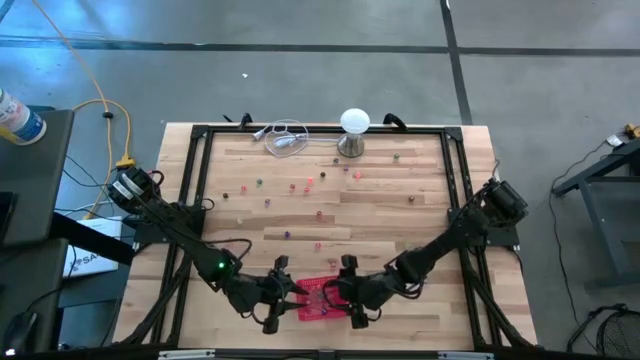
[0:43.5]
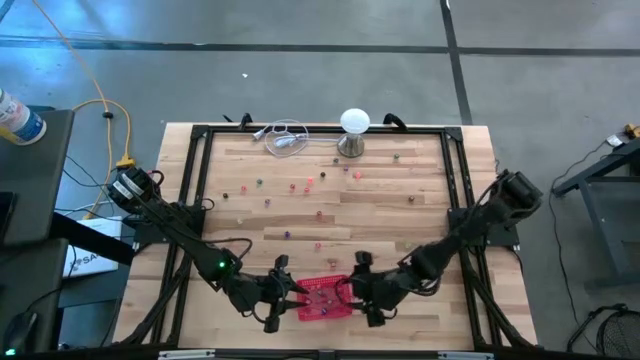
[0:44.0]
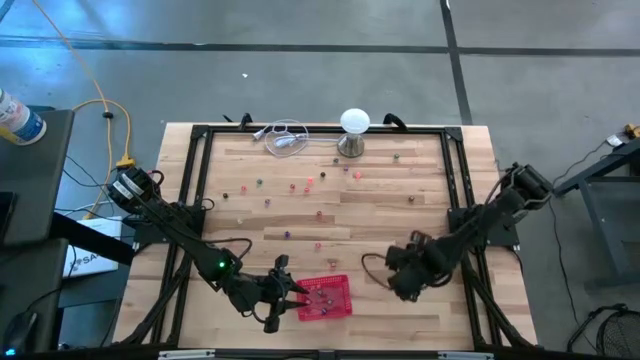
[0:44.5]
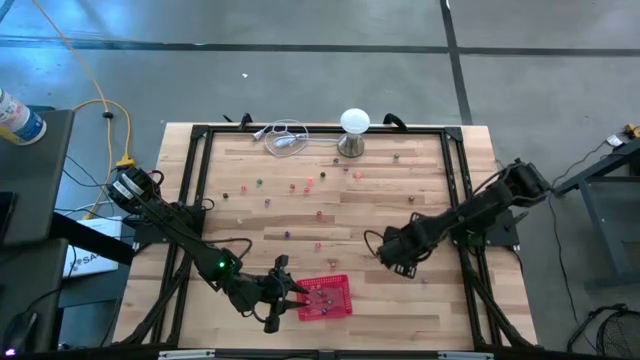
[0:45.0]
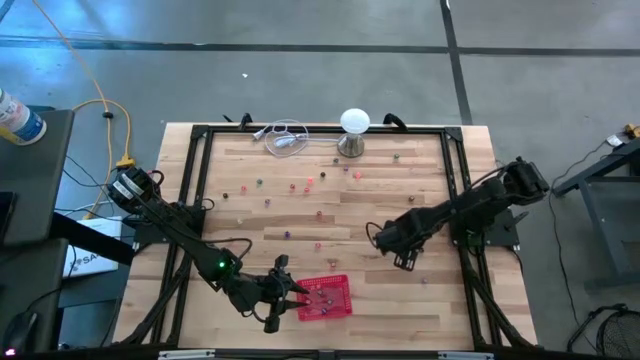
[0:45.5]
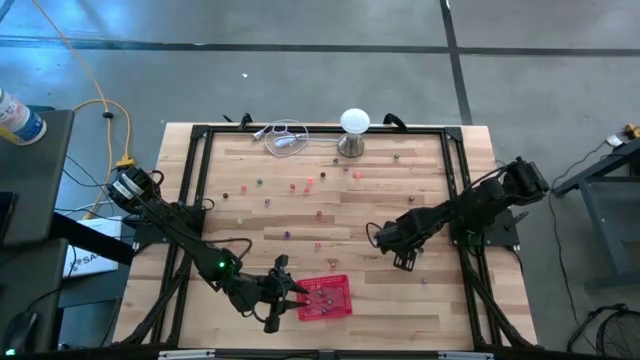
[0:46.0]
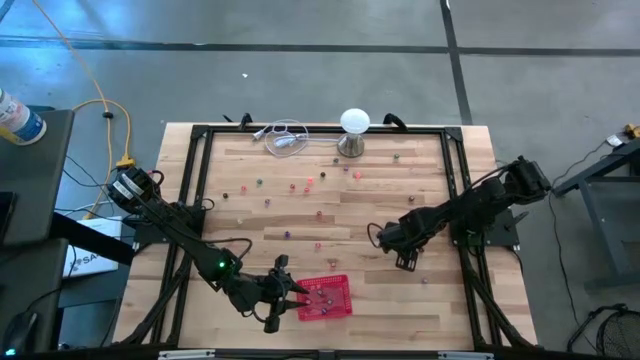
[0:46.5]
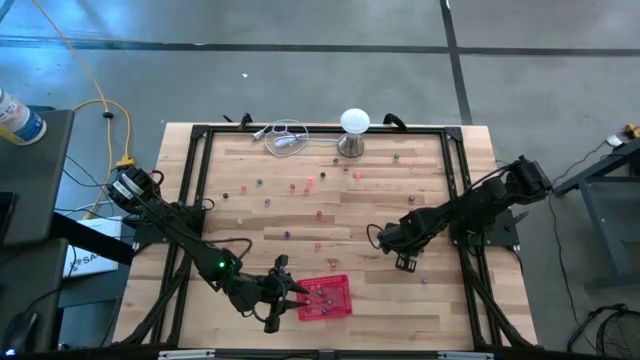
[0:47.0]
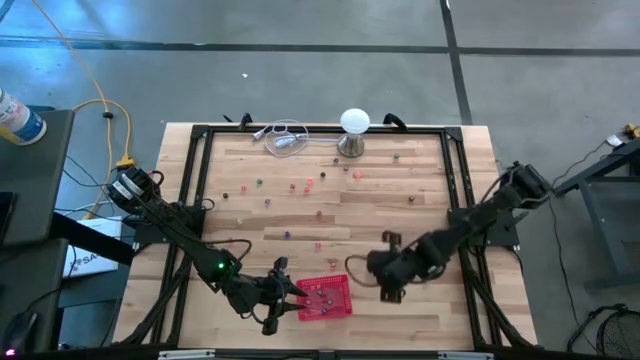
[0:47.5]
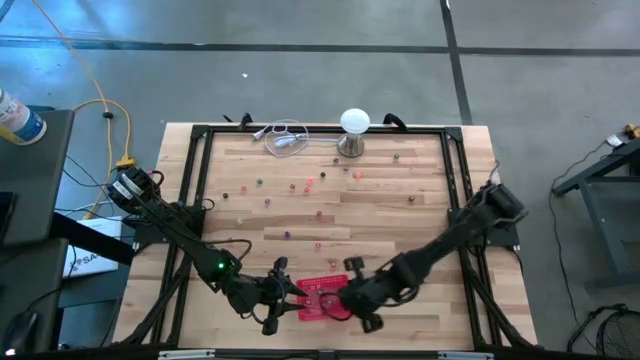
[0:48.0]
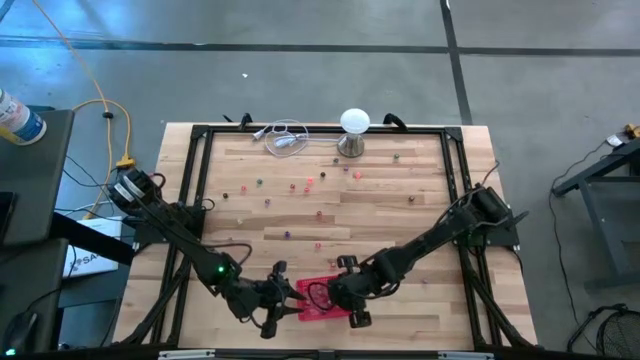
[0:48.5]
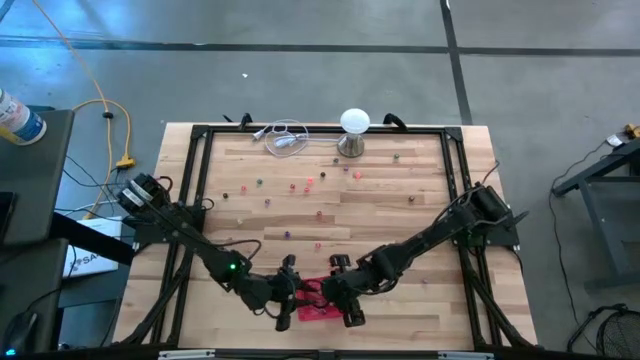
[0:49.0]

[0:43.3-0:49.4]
Task: Pick & Place Dice
Put the yellow dice into the red bin

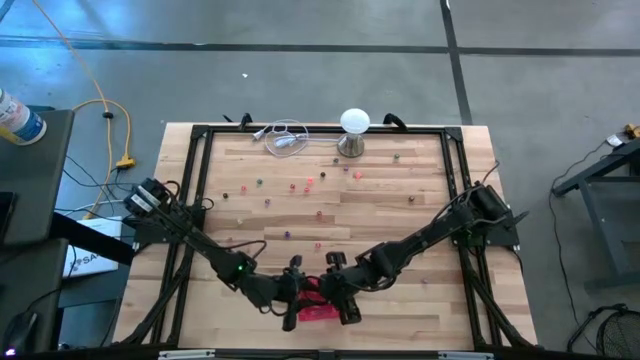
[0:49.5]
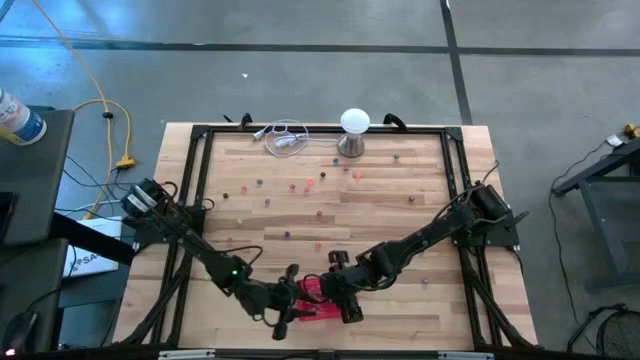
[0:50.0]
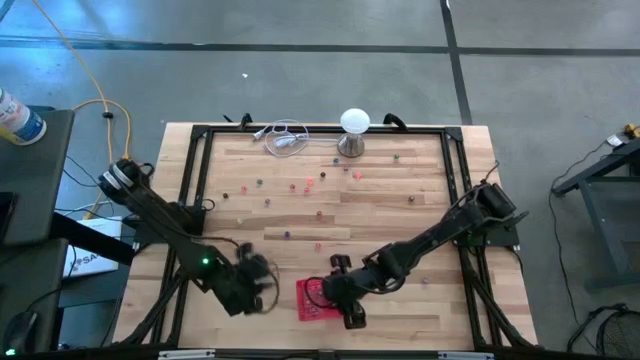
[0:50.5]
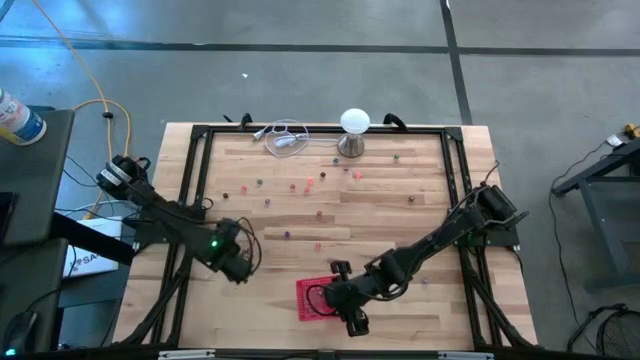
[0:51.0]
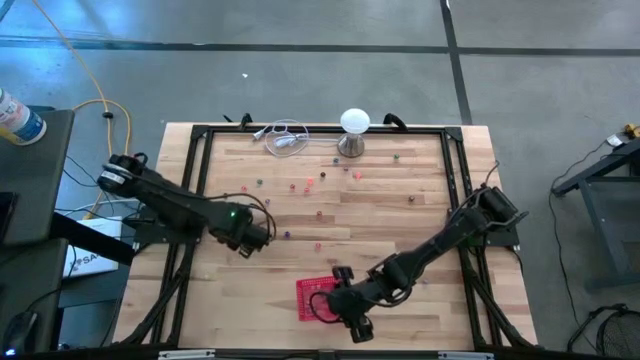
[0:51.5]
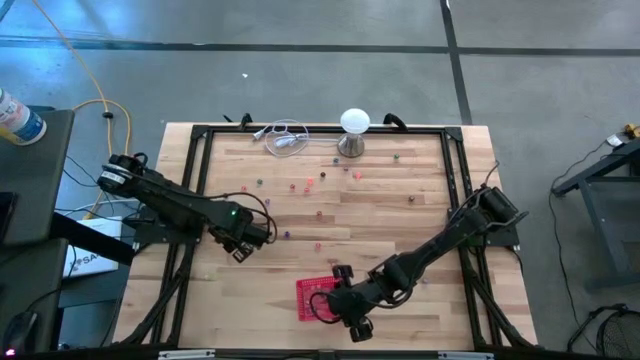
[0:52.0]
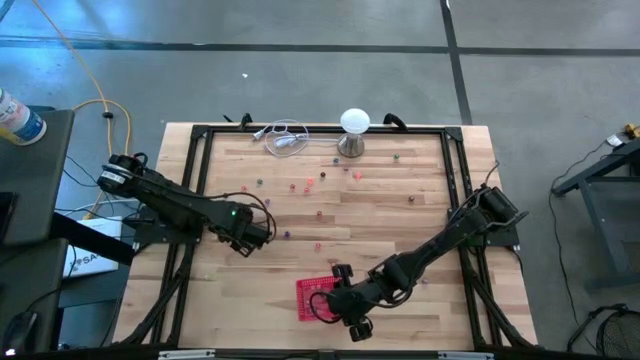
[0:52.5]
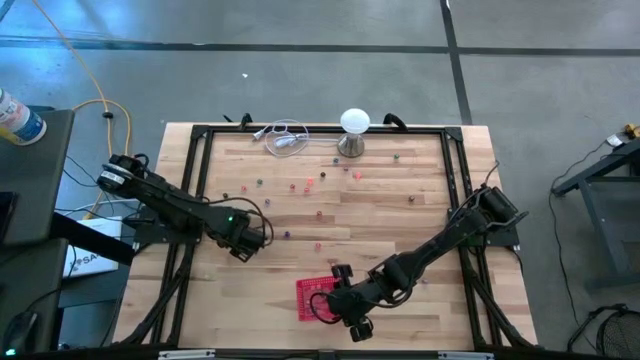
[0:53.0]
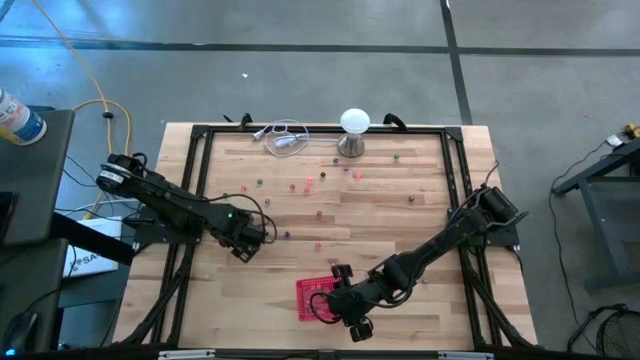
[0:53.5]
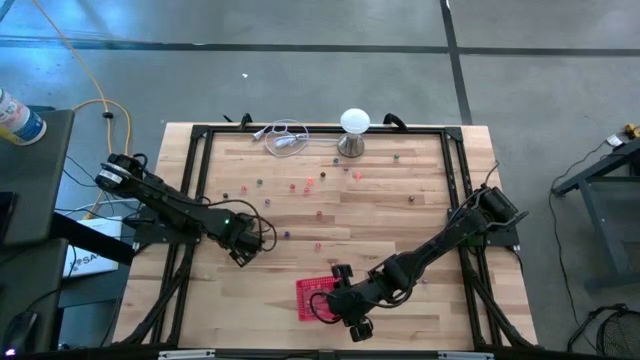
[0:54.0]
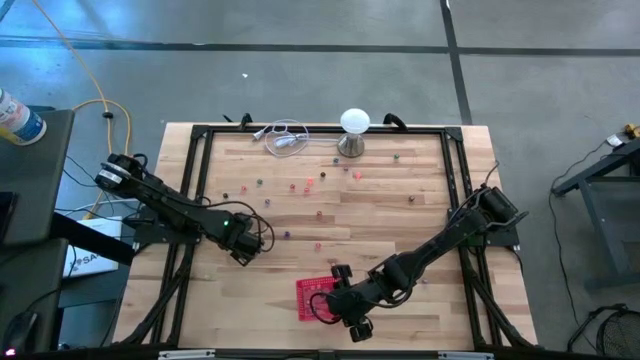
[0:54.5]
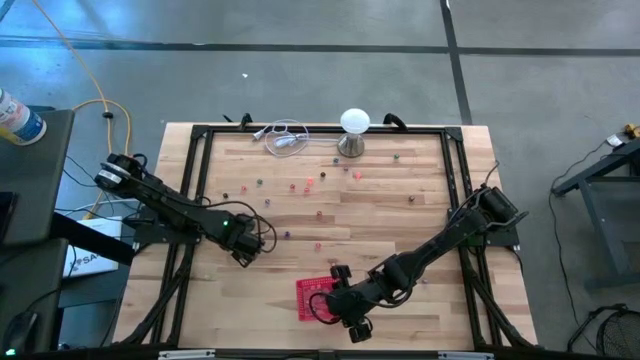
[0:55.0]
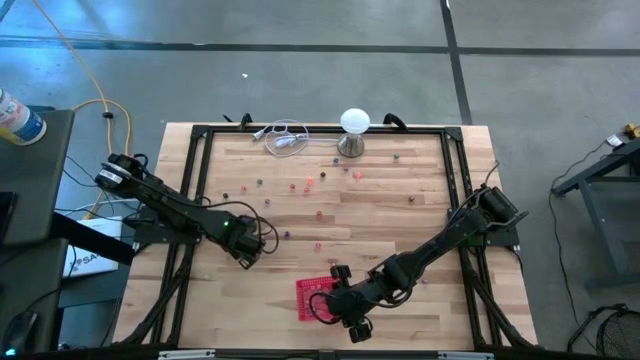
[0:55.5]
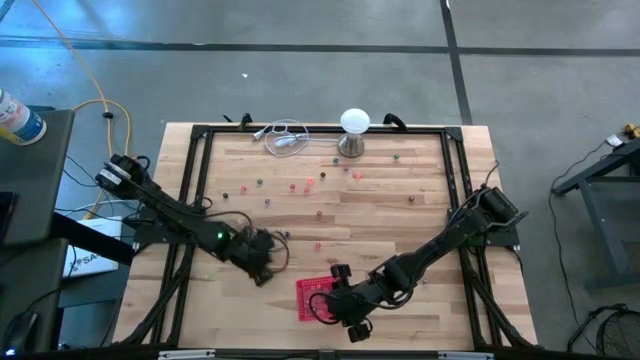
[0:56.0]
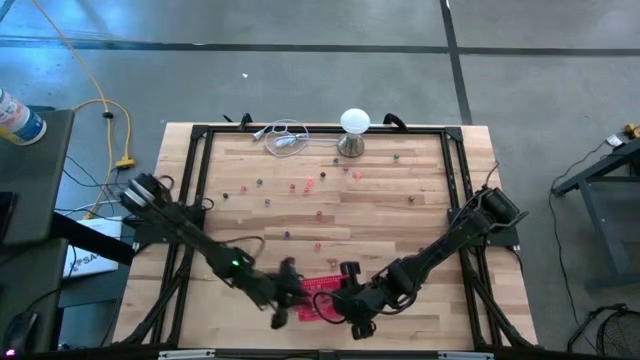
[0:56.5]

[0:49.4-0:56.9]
Put the red dice into the red bin

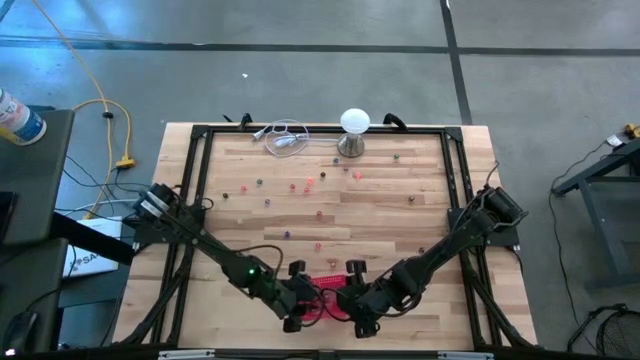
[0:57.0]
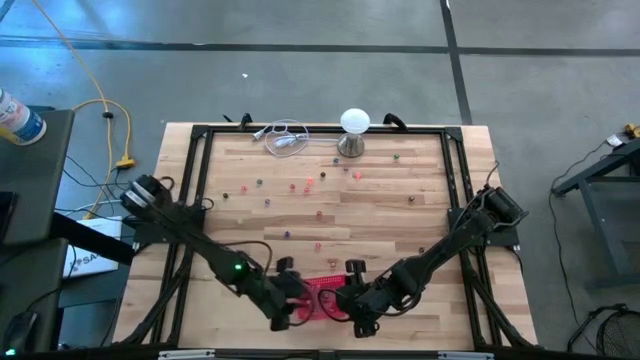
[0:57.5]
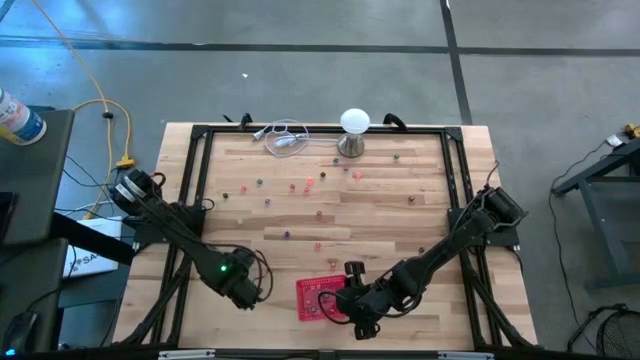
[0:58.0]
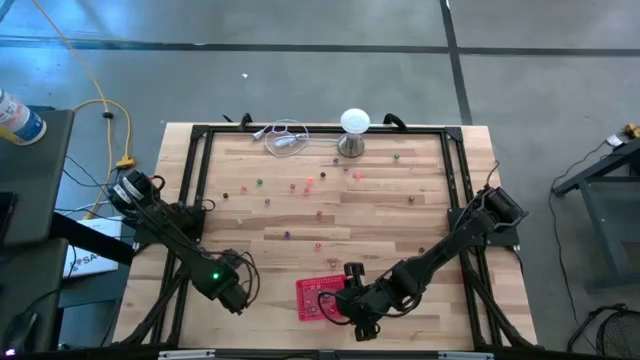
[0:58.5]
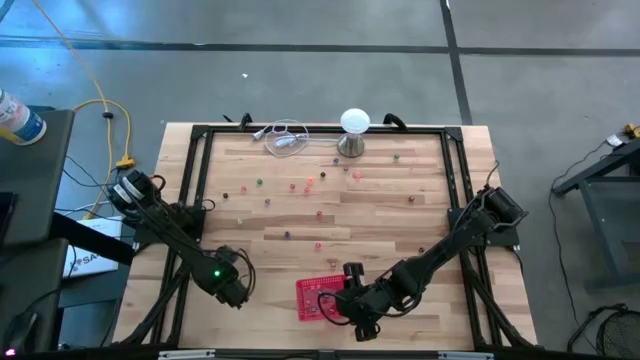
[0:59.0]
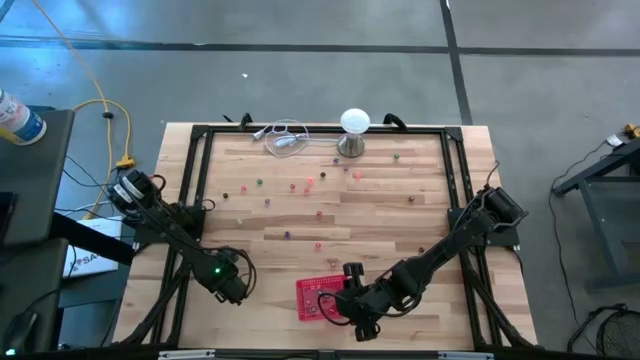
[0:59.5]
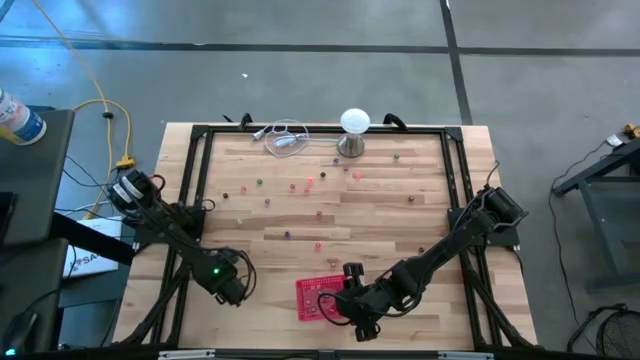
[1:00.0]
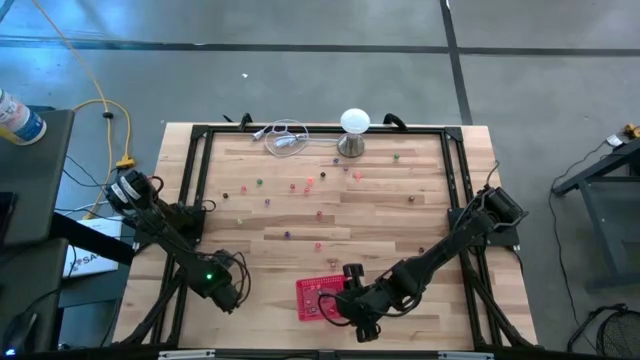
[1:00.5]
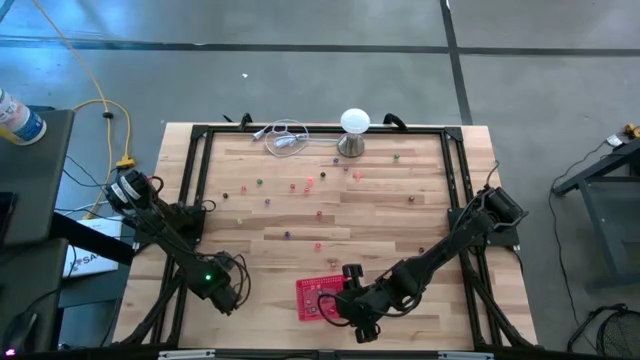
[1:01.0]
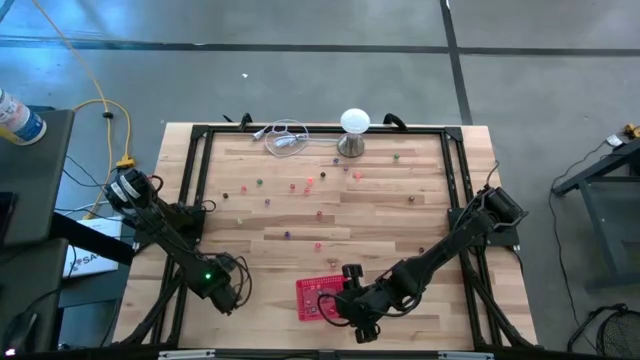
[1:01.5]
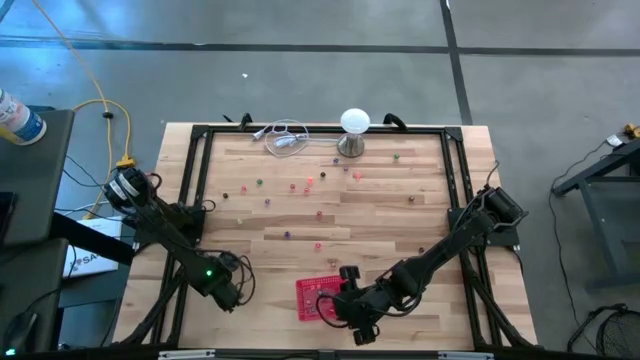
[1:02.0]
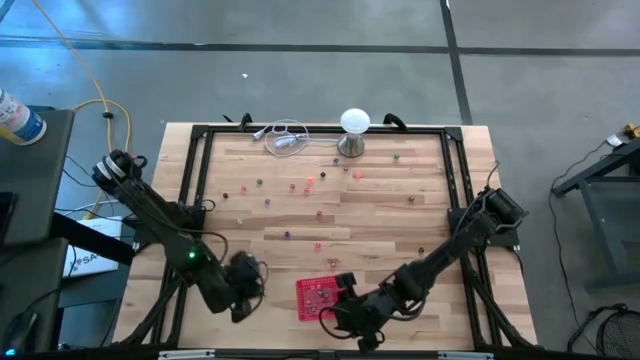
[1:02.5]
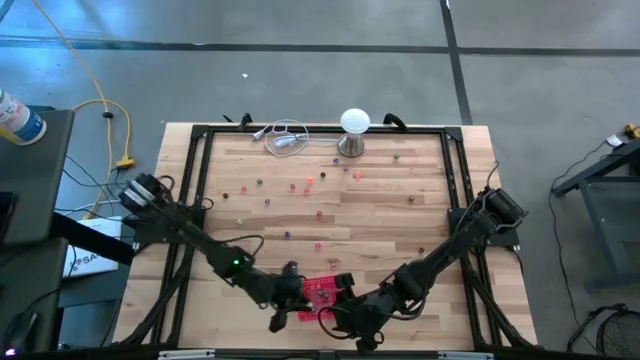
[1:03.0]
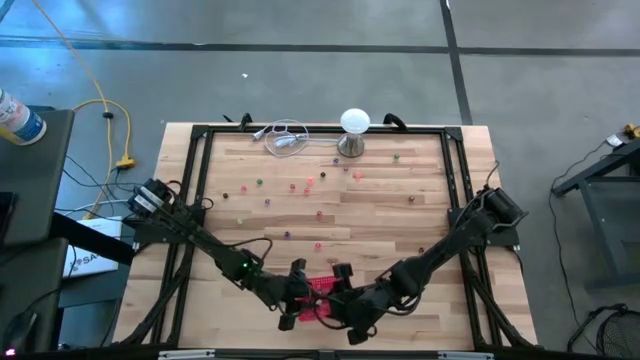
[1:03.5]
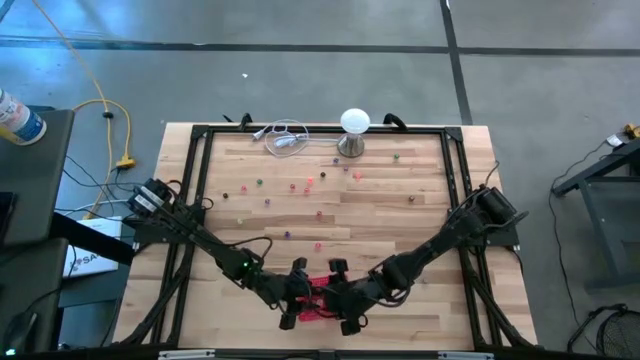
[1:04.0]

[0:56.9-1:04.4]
Put the yellow dice into the red bin

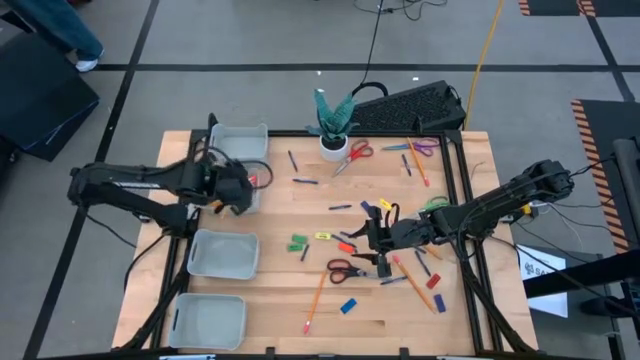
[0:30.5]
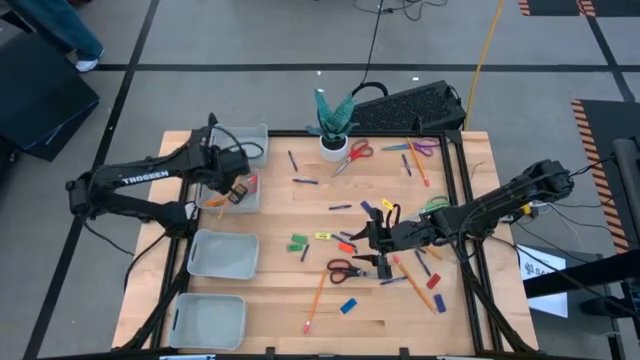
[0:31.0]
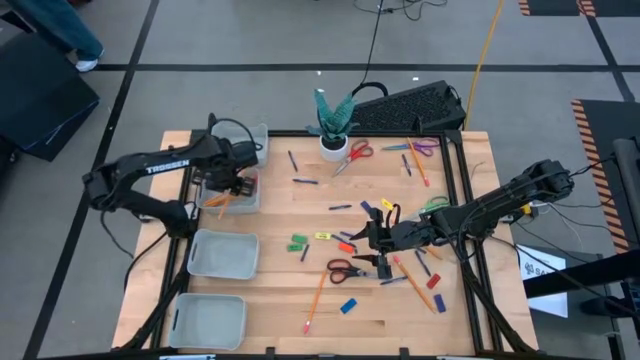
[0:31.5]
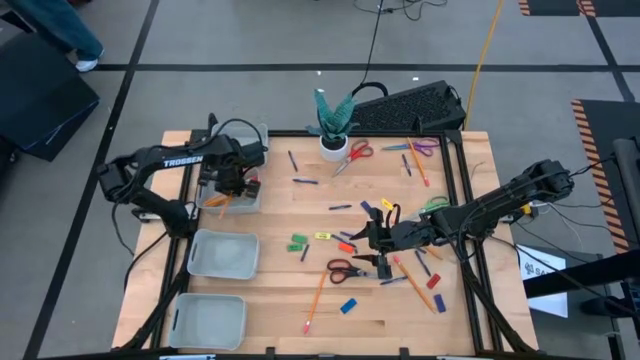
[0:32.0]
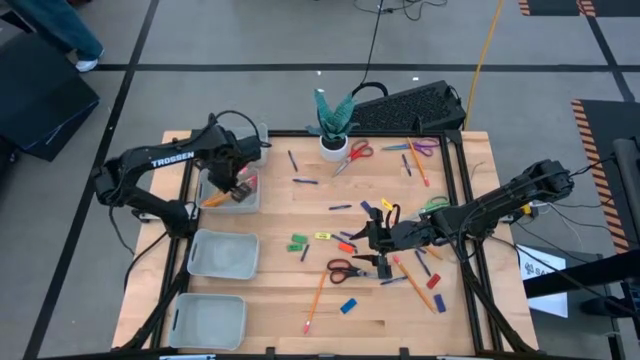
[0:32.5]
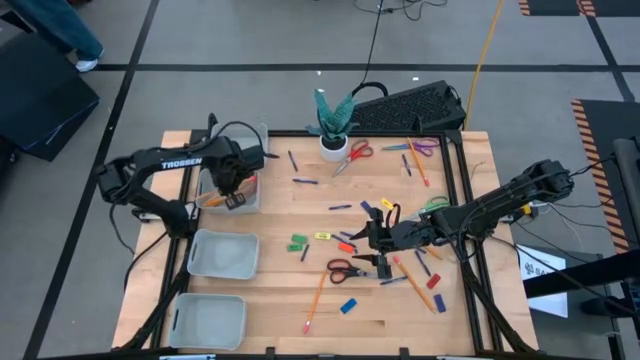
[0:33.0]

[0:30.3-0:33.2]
Task: Sort crayons/erasers/pens/pencils in bins
Put the orange pencil into the middle top gray bin
